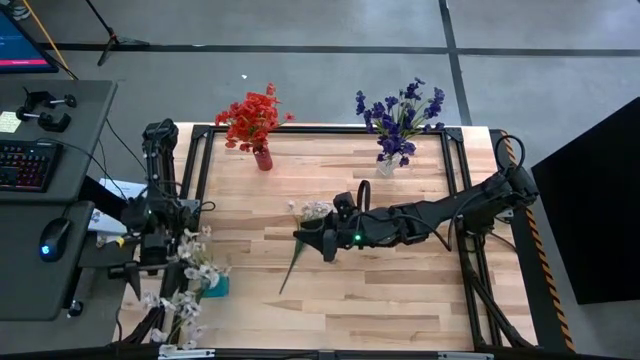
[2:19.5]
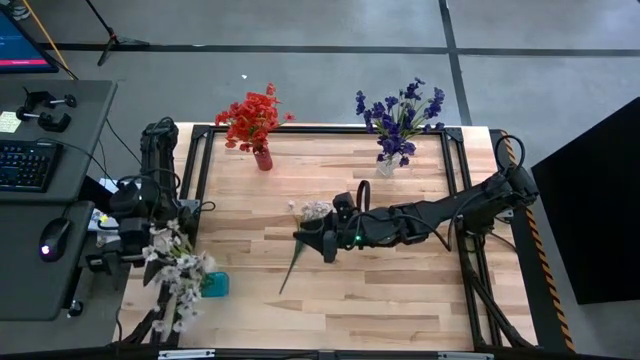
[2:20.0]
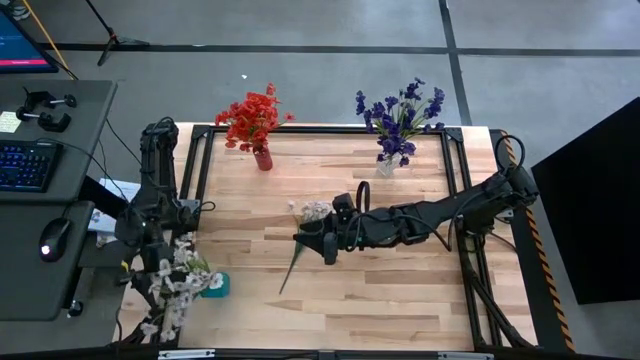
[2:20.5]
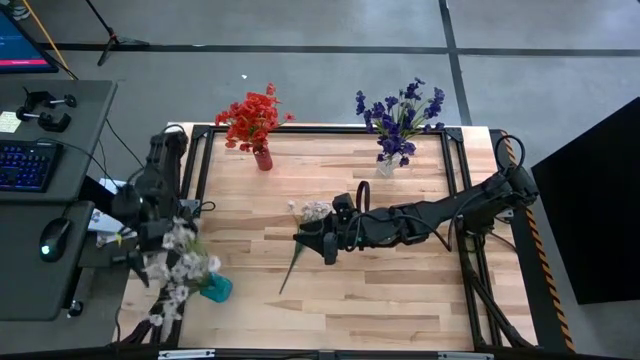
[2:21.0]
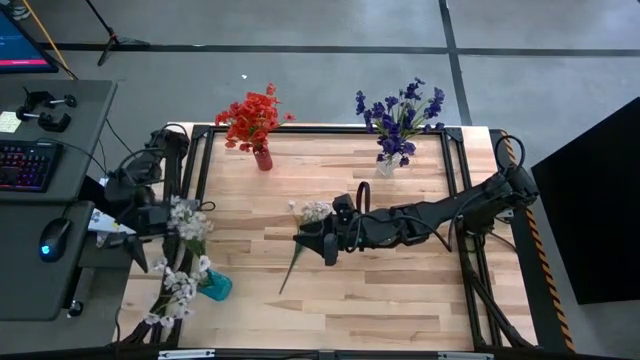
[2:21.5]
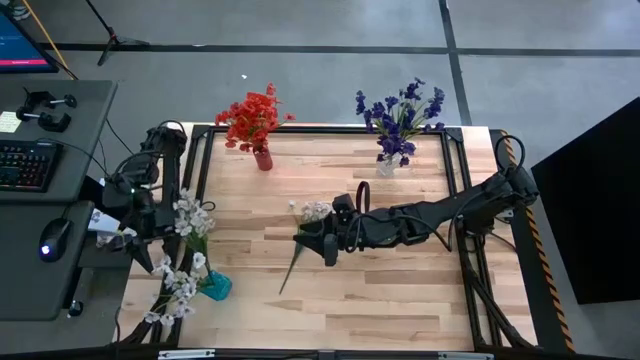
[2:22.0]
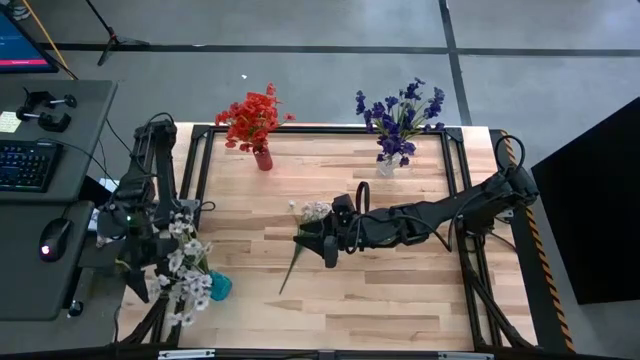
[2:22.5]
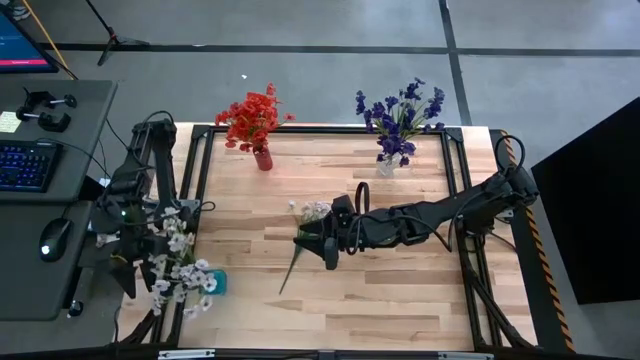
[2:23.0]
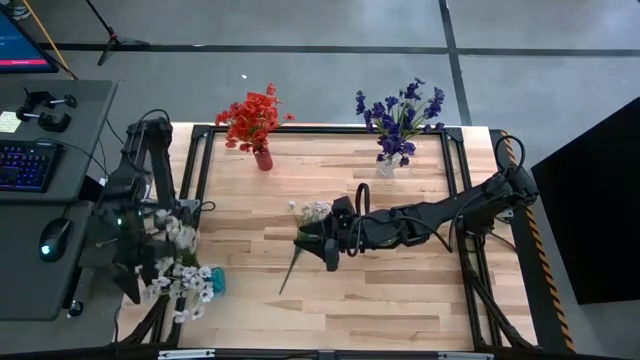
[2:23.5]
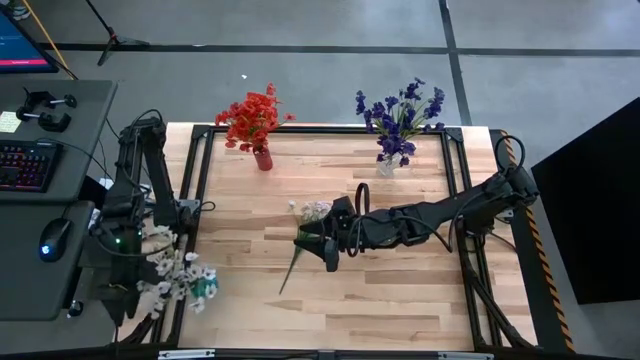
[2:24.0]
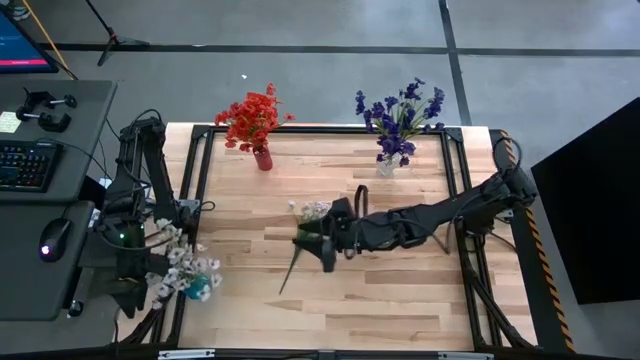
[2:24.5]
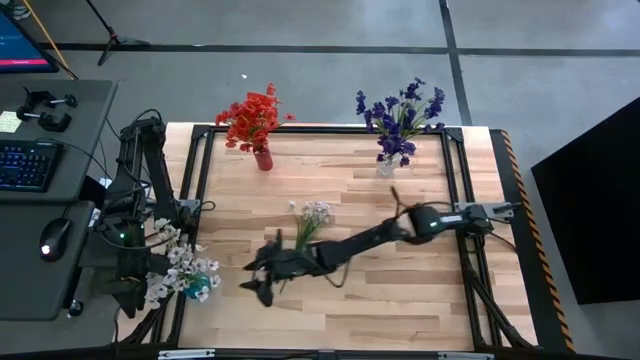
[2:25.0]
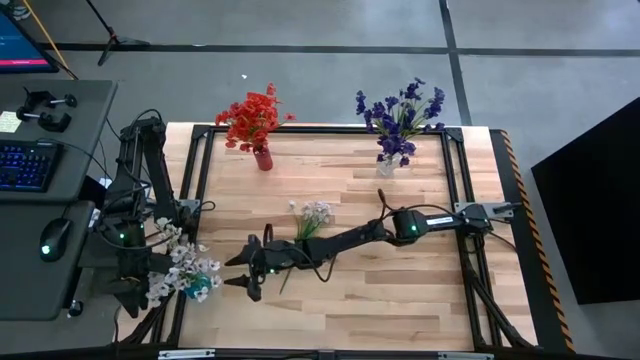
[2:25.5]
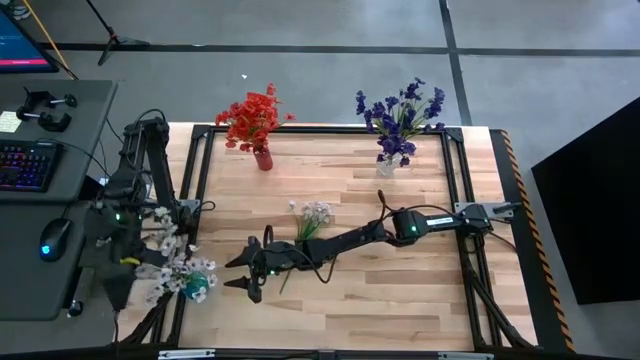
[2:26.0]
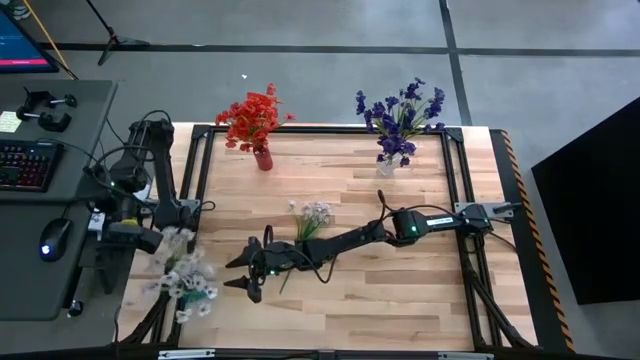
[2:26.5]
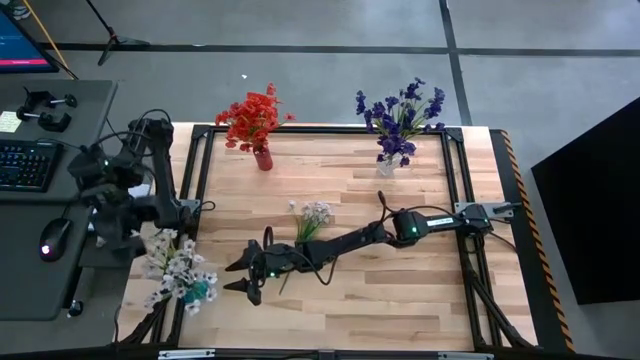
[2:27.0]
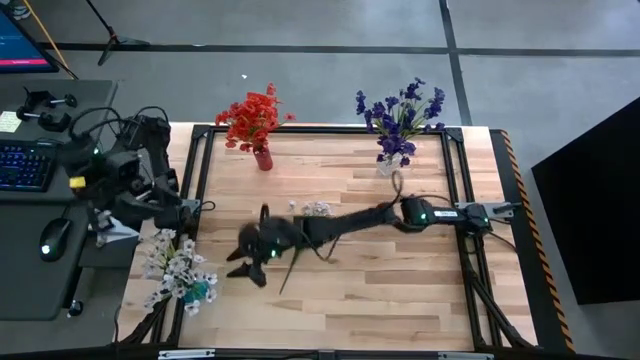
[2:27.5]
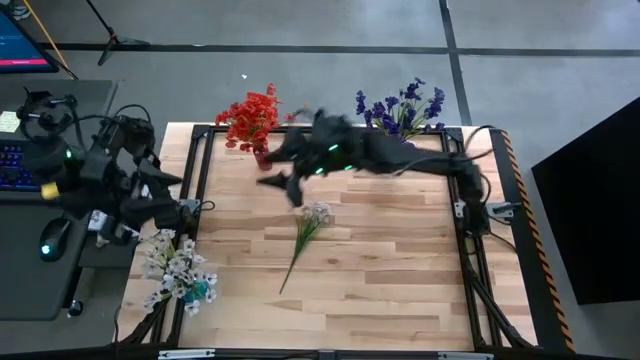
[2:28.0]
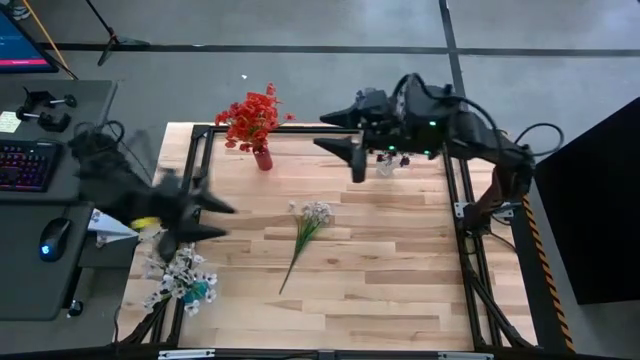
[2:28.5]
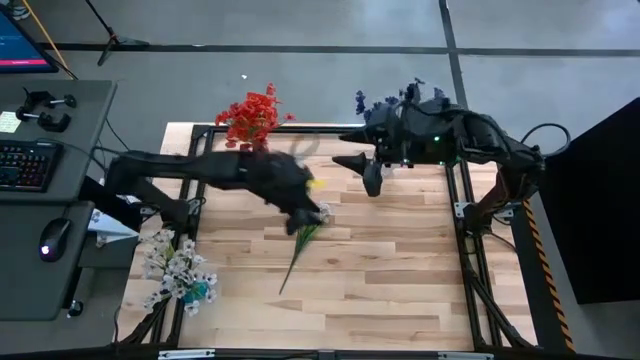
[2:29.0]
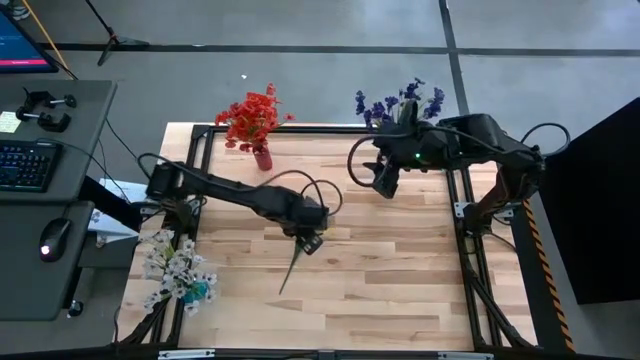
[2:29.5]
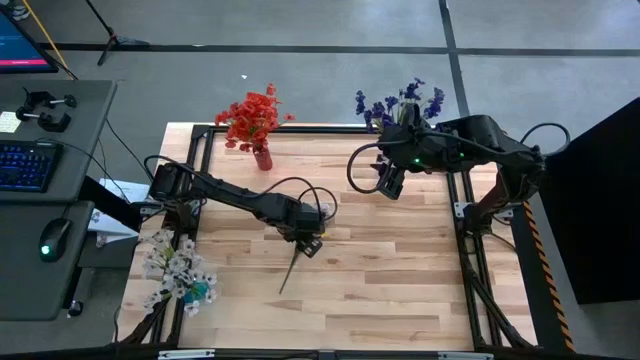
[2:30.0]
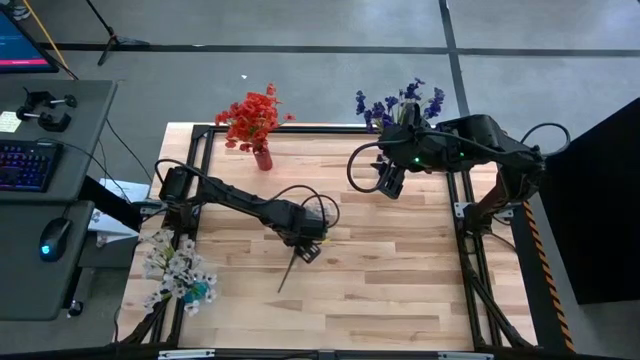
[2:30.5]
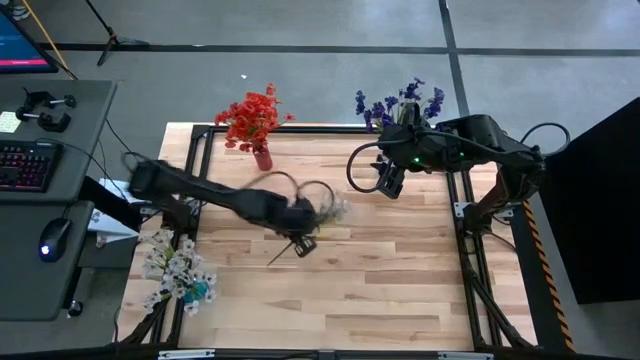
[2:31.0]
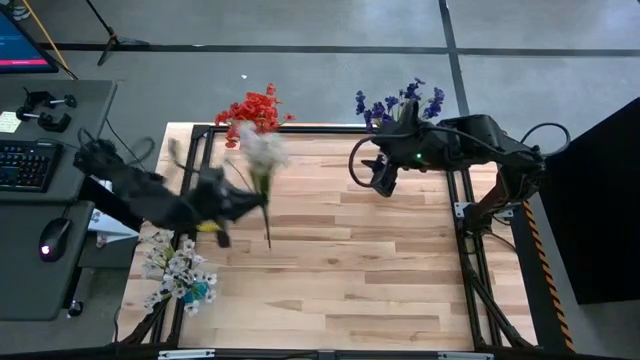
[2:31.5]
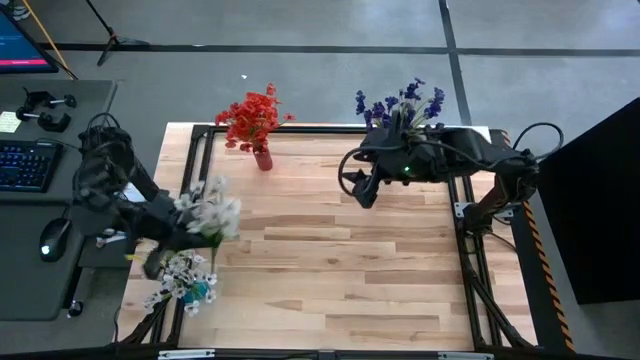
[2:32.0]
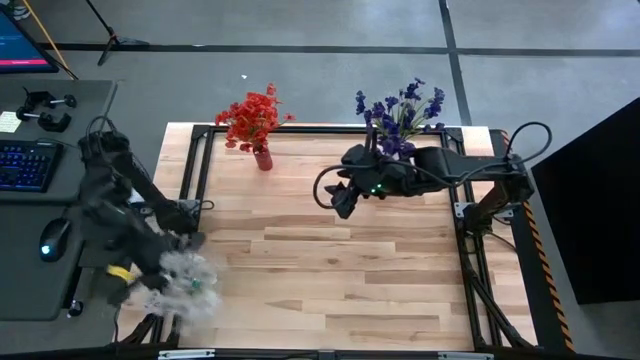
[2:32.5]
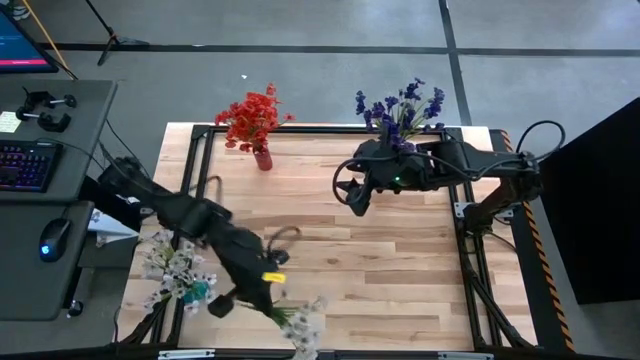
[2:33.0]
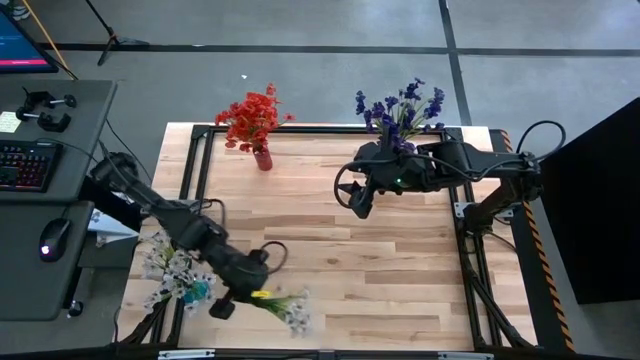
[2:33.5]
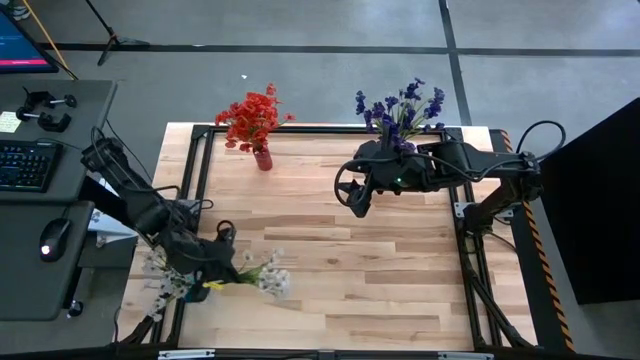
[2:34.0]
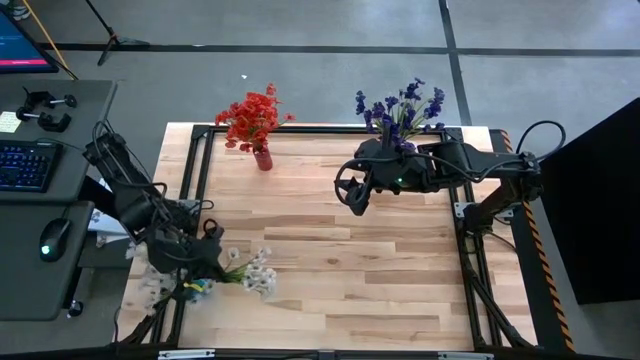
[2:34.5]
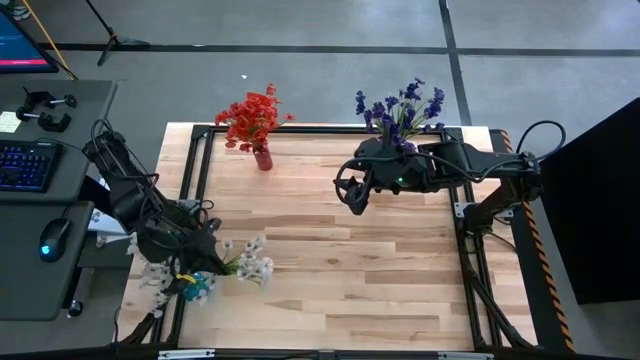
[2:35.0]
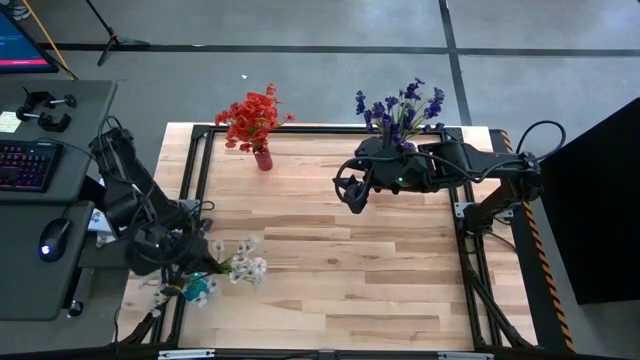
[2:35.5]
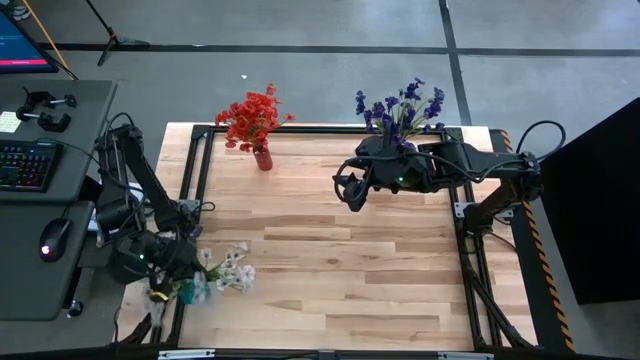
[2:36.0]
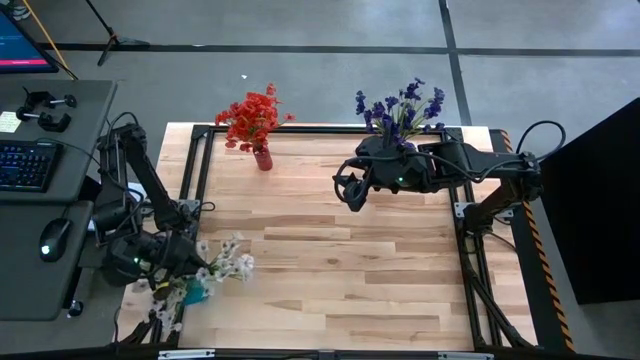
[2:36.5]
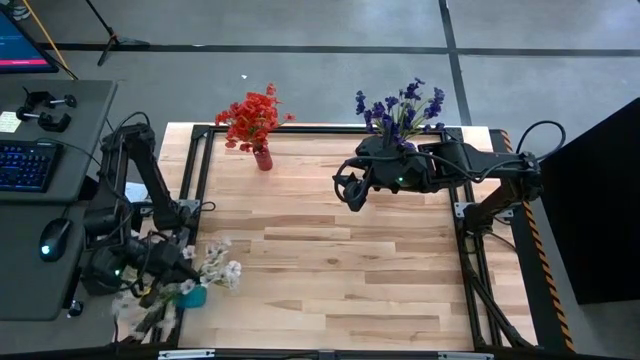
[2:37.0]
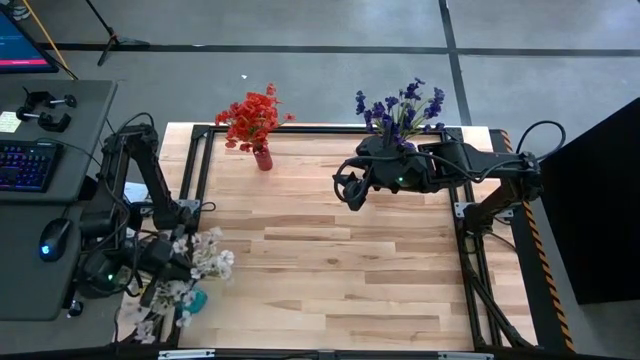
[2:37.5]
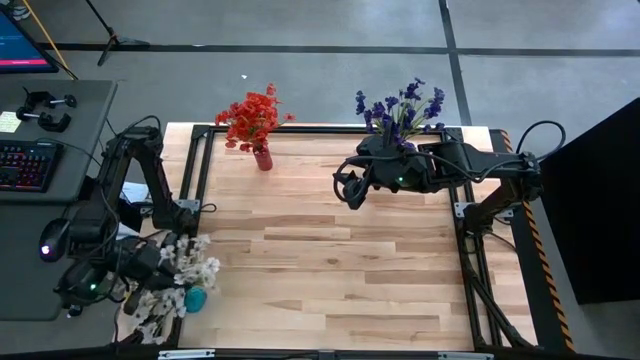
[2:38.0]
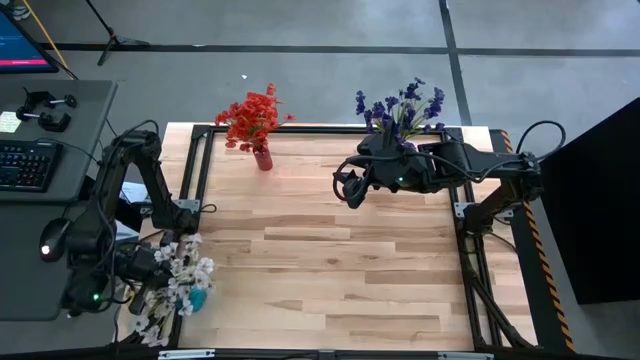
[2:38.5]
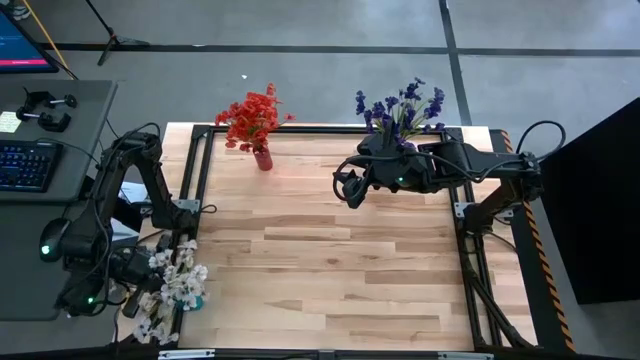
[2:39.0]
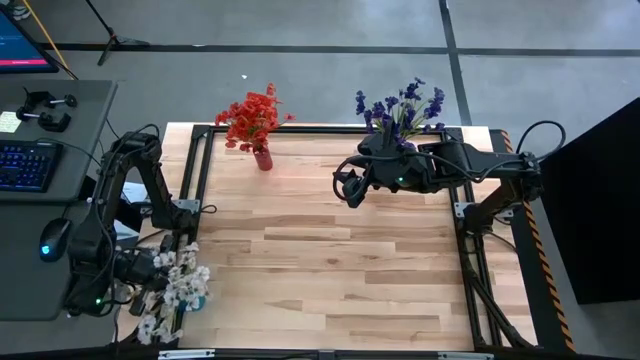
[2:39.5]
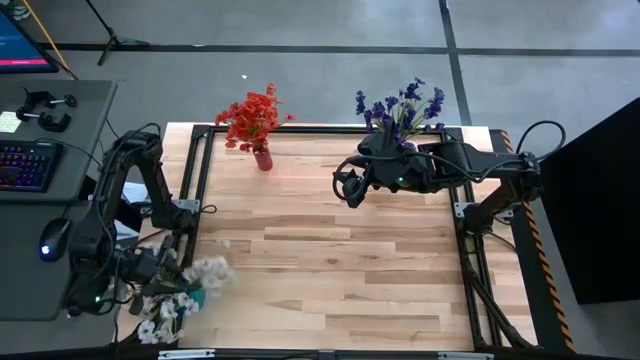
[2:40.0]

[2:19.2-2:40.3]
Task: Sort flowers into vase by color
Put the white flowers into the blue vase

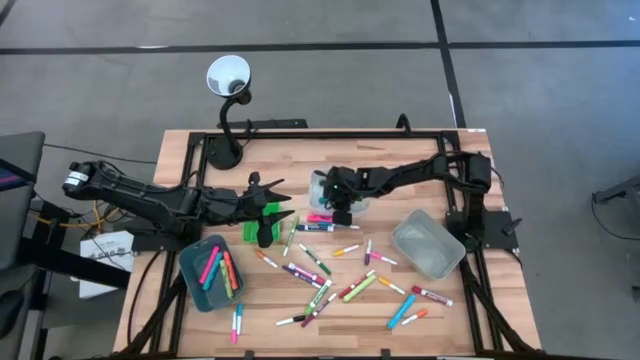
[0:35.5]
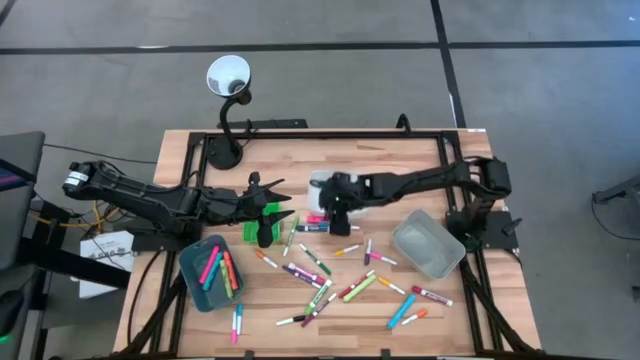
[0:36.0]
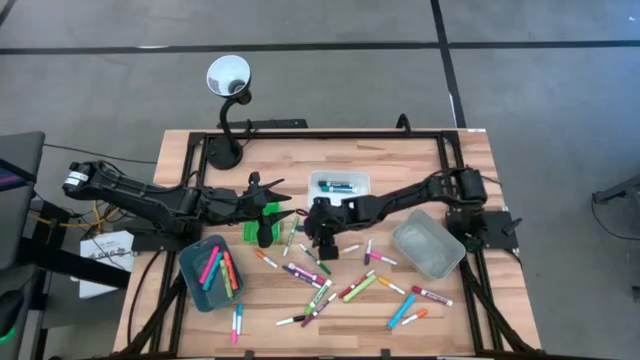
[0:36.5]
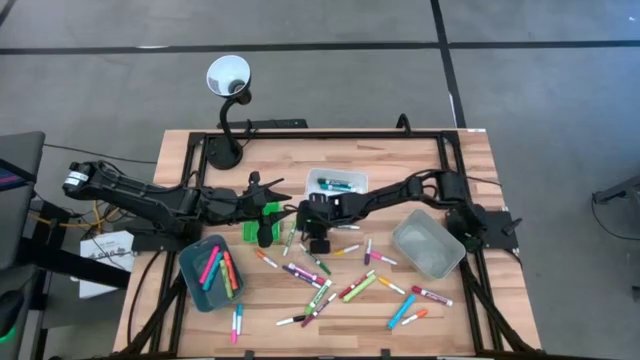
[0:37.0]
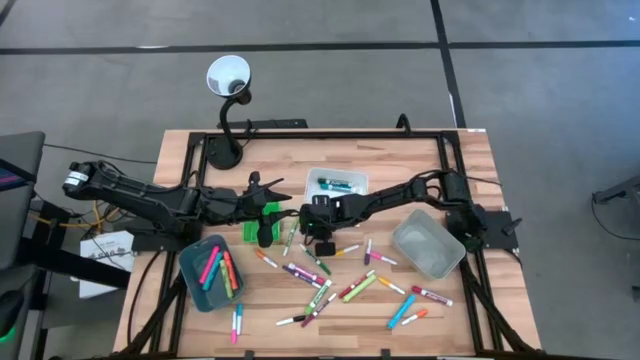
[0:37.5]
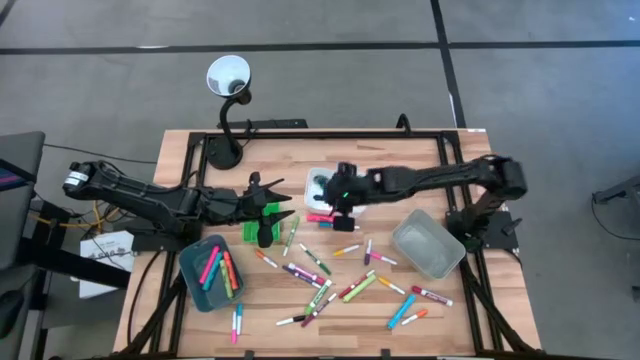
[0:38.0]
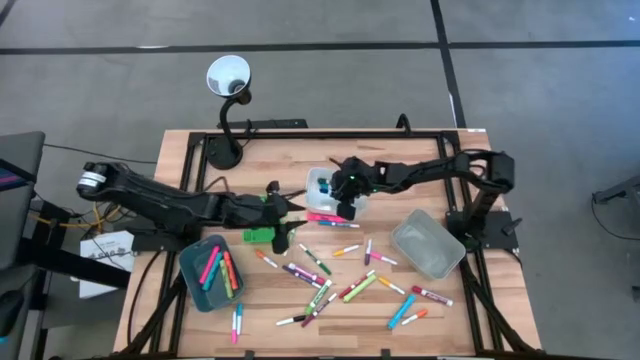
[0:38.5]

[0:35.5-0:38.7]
Task: Pick & Place Markers
Put the big blue marker pen into the white bin
